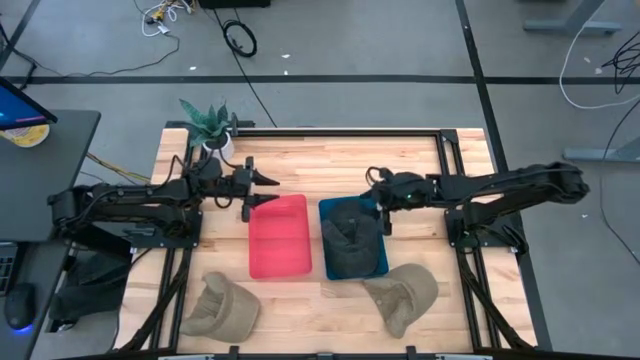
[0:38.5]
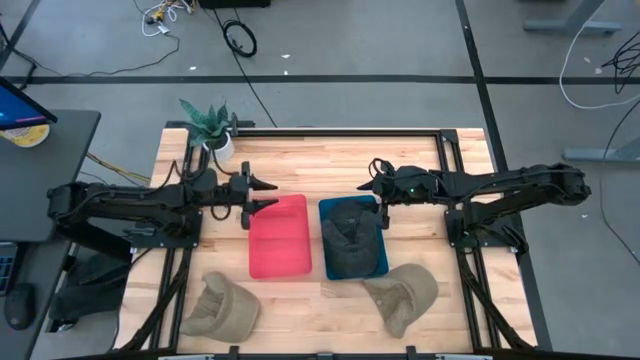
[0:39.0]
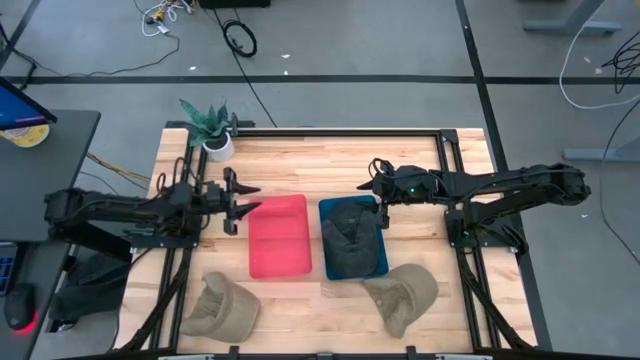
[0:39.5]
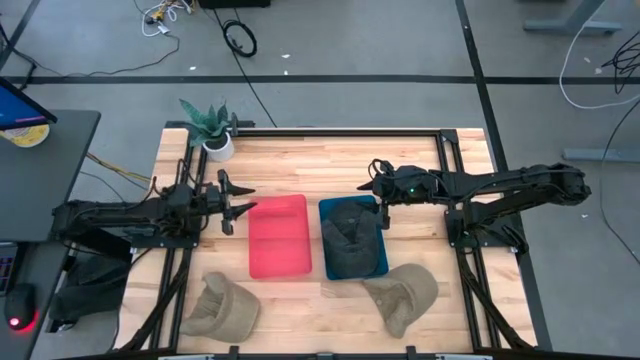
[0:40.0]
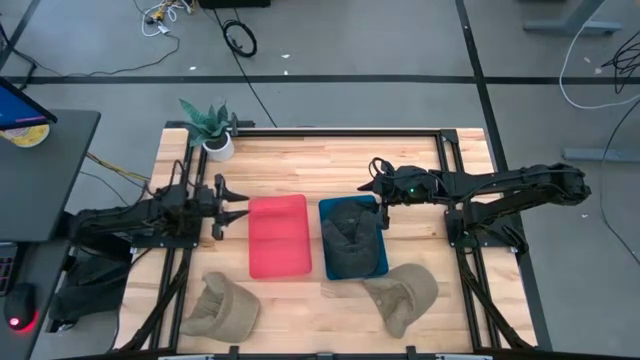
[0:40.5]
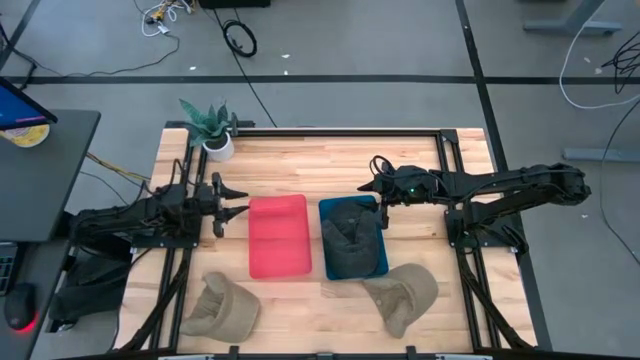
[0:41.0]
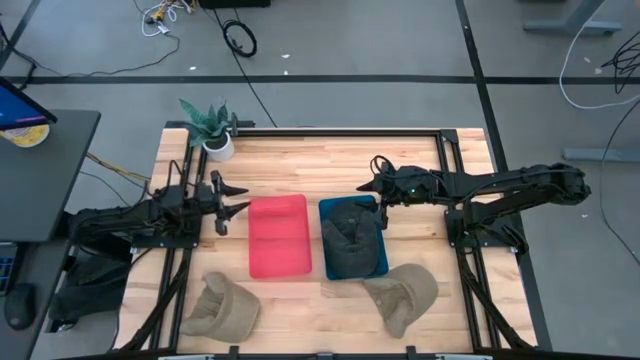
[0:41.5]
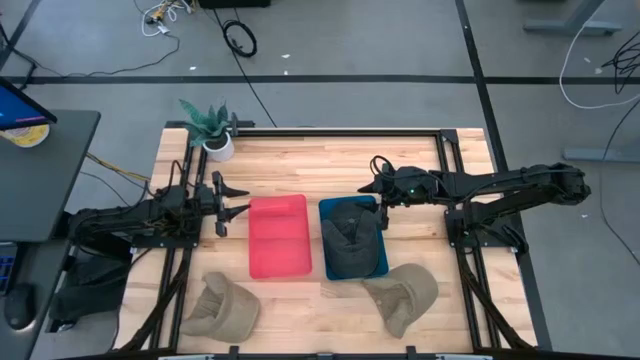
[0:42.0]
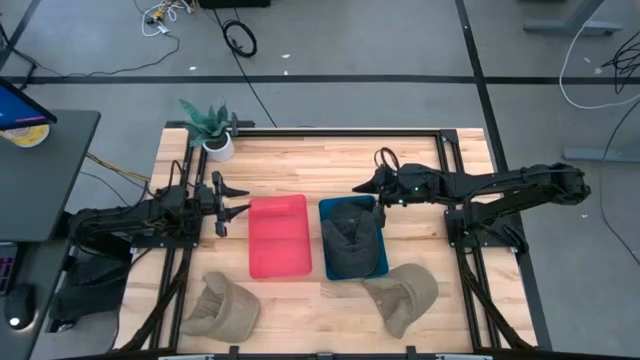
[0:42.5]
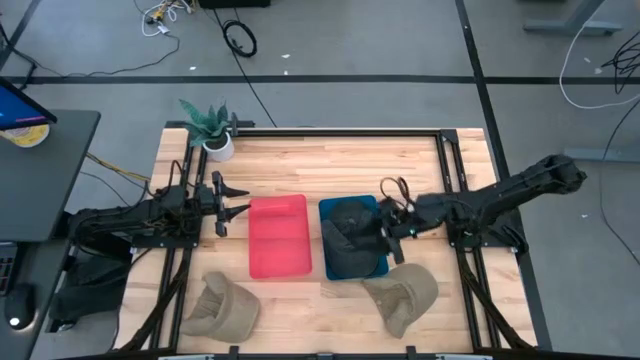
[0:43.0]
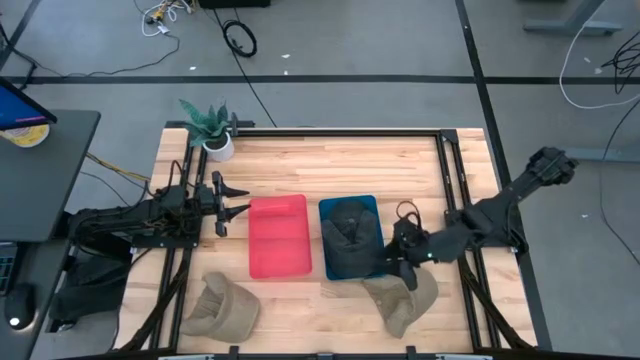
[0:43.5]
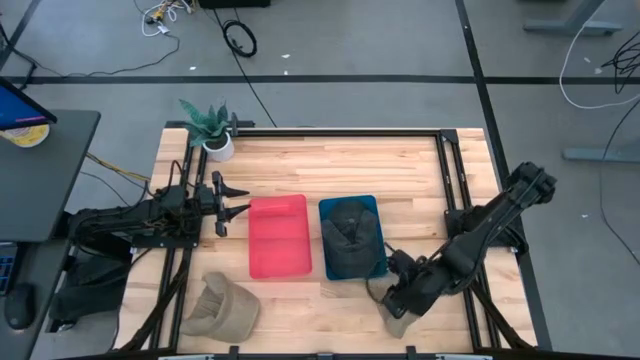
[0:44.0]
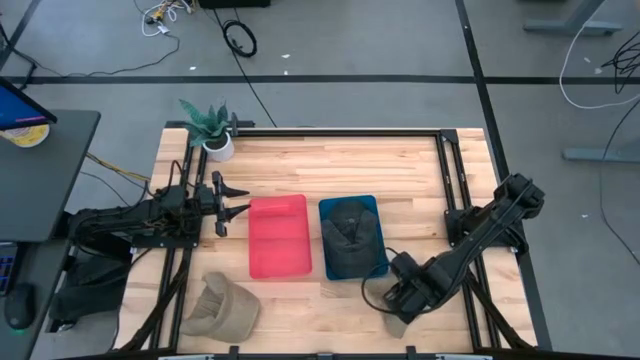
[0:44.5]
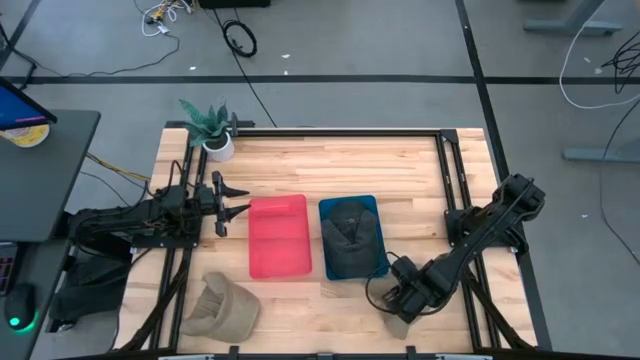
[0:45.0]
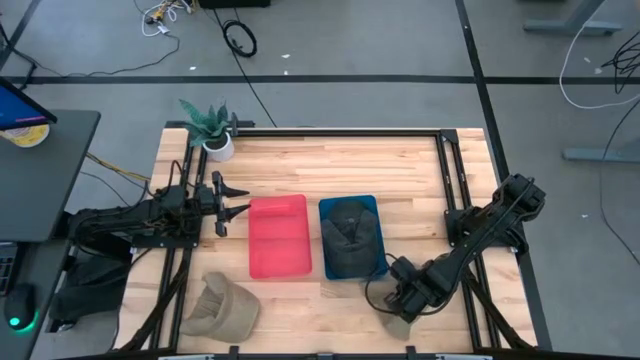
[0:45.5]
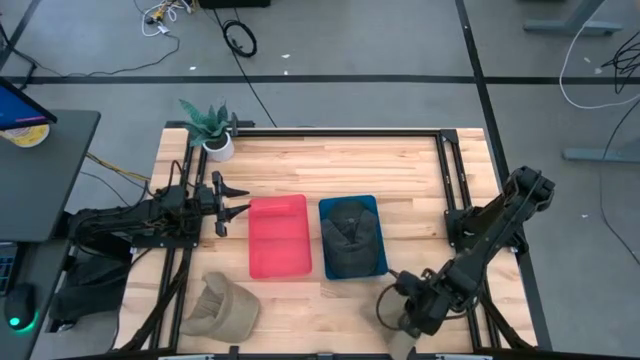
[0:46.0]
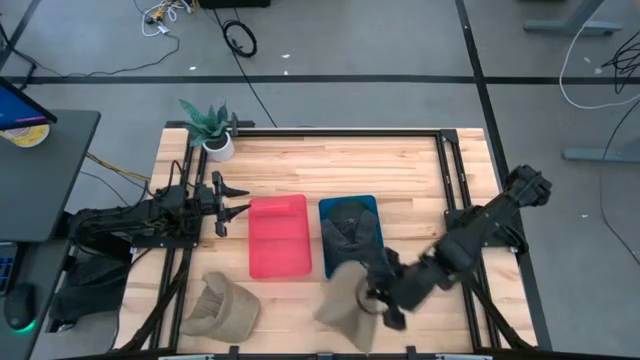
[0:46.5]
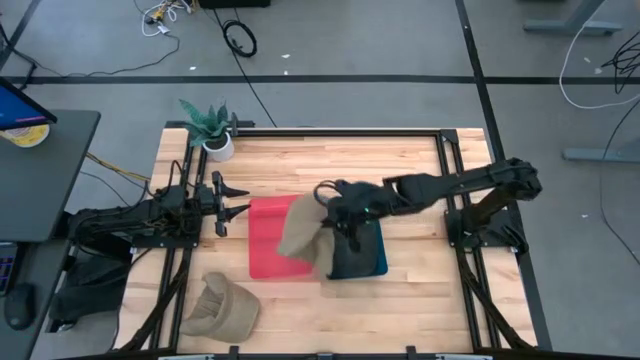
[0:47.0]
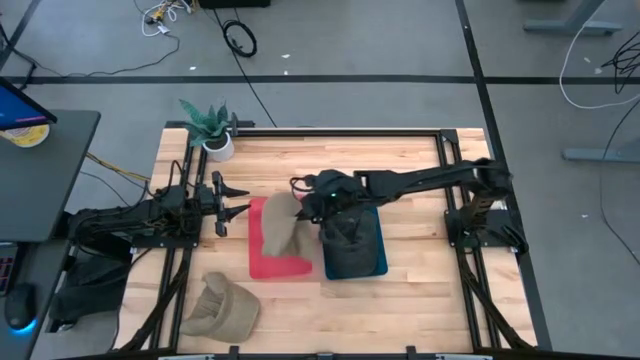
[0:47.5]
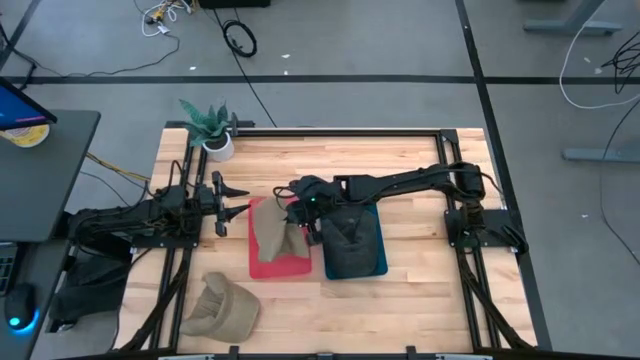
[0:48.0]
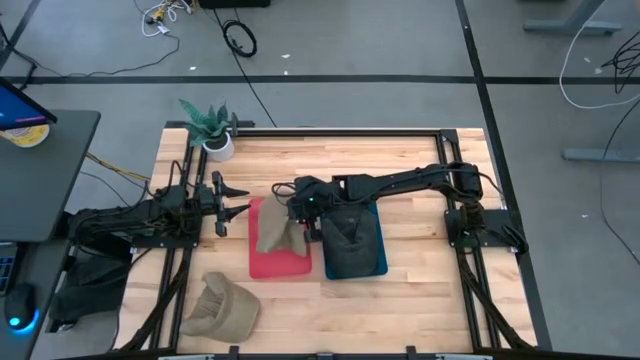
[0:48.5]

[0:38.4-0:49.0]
Task: Pick & Place hat
Put the brown cap into the red bin

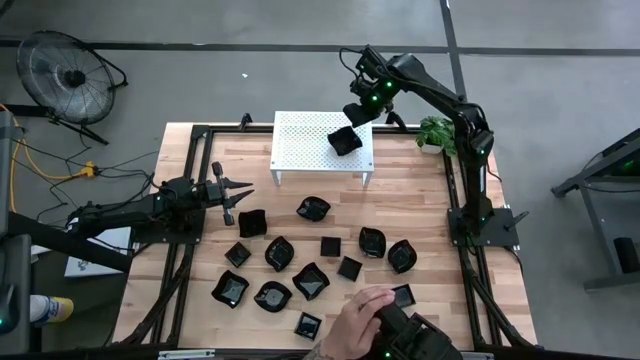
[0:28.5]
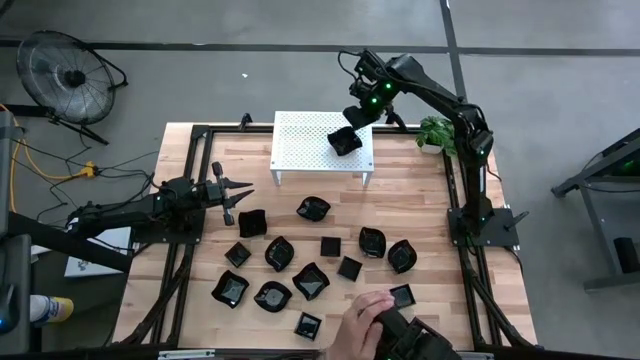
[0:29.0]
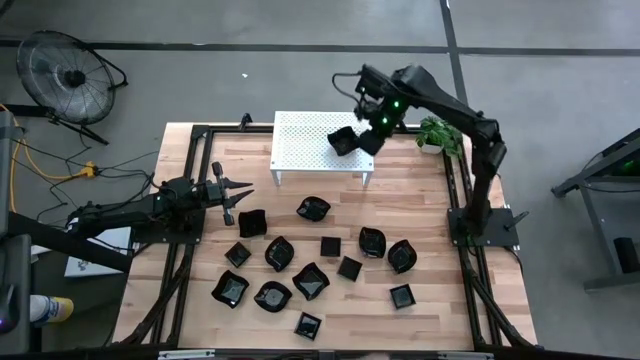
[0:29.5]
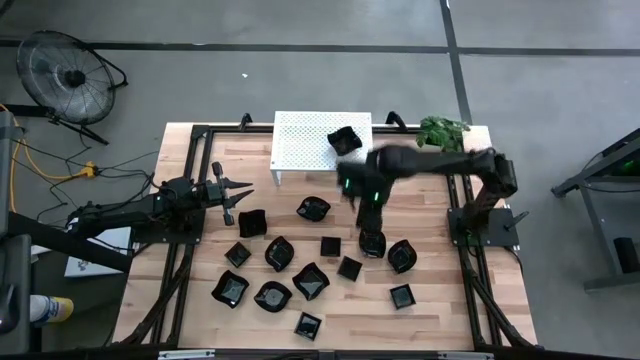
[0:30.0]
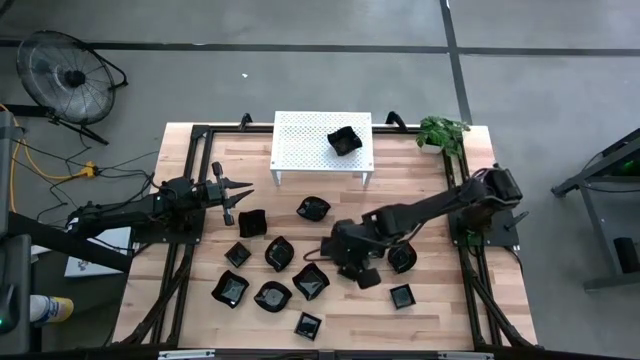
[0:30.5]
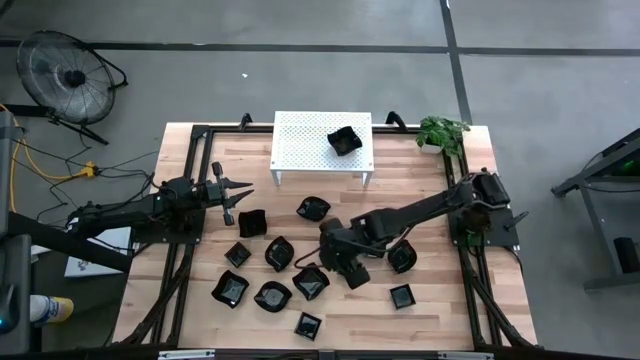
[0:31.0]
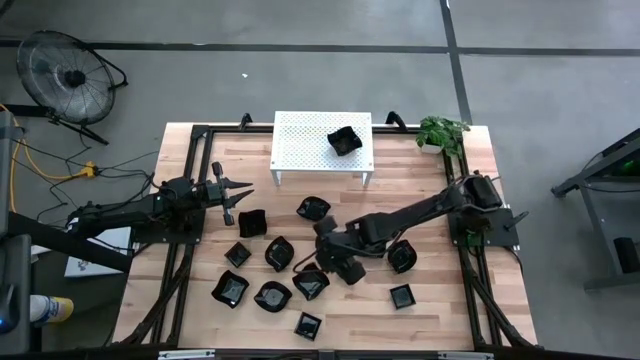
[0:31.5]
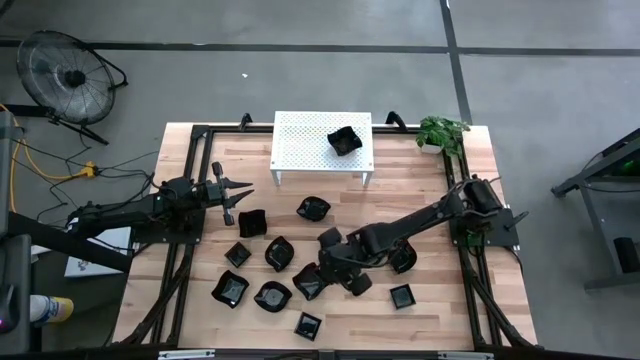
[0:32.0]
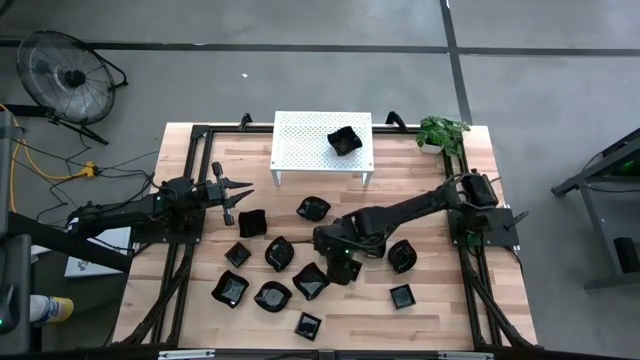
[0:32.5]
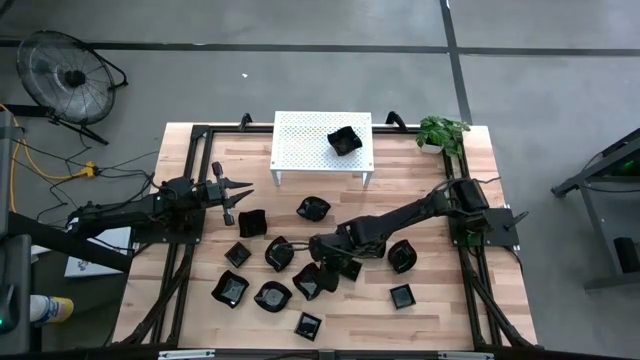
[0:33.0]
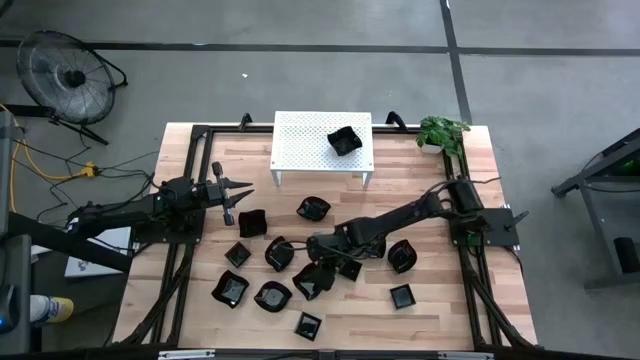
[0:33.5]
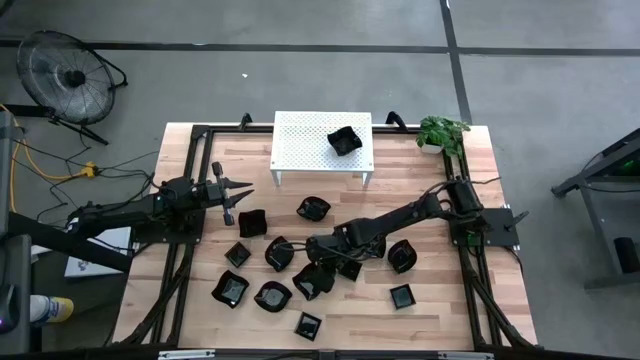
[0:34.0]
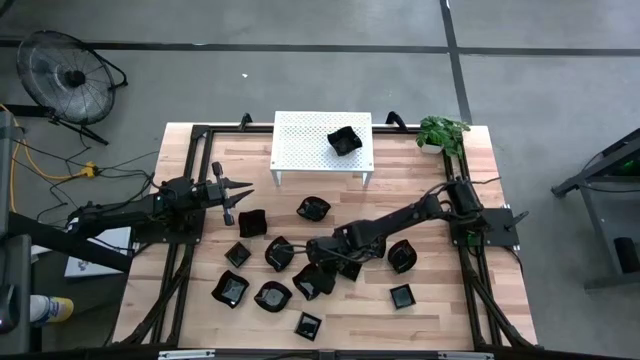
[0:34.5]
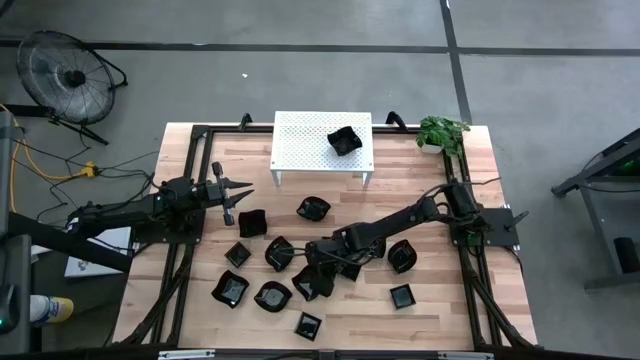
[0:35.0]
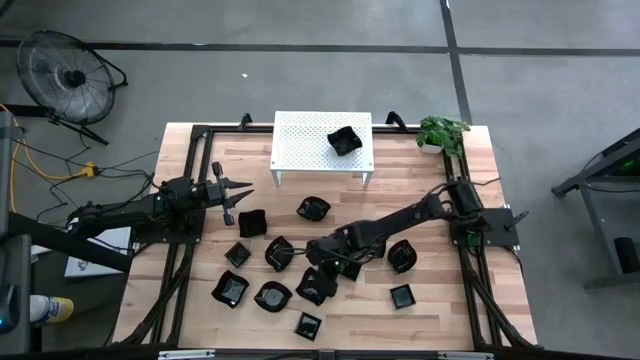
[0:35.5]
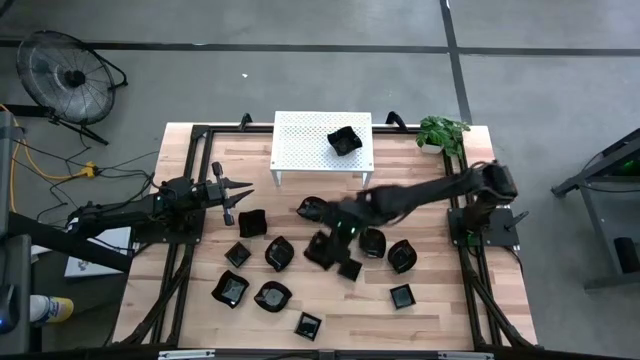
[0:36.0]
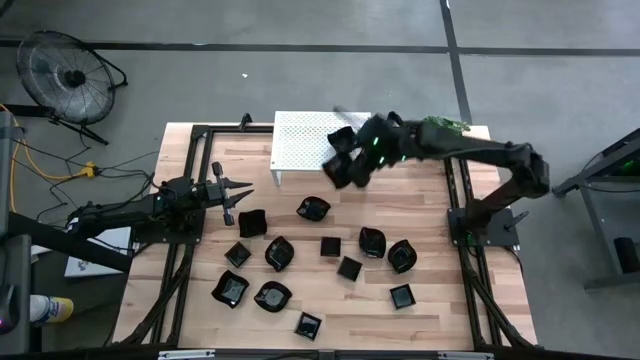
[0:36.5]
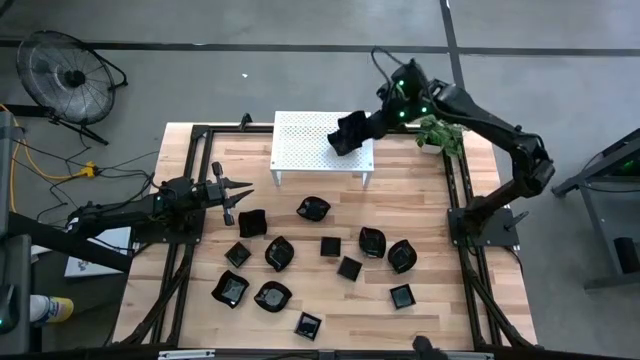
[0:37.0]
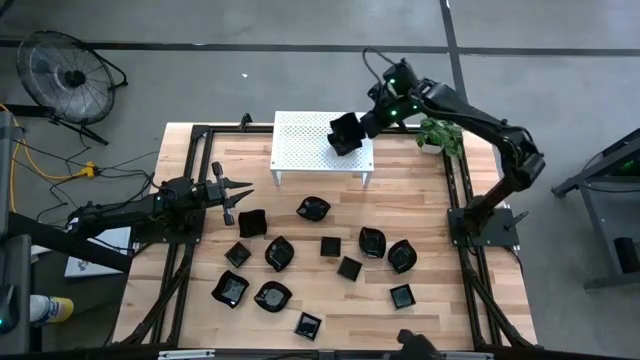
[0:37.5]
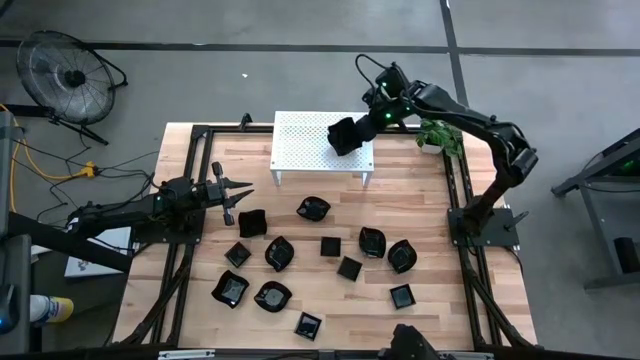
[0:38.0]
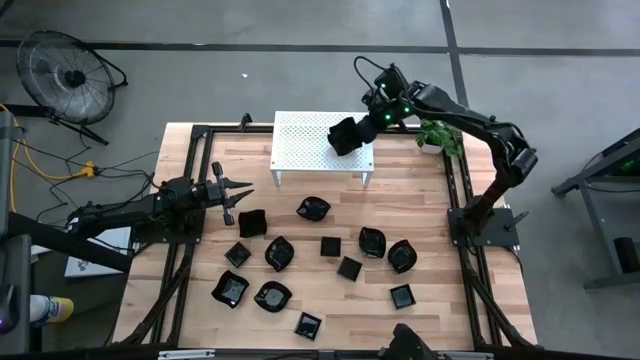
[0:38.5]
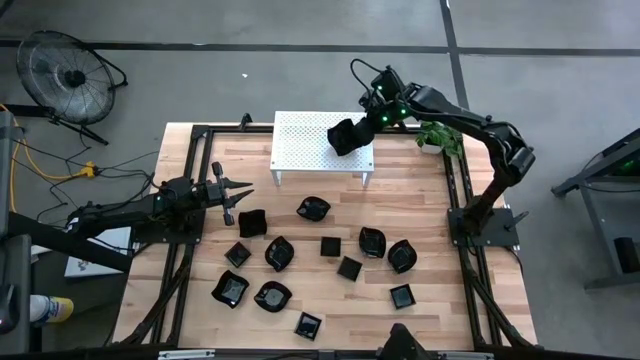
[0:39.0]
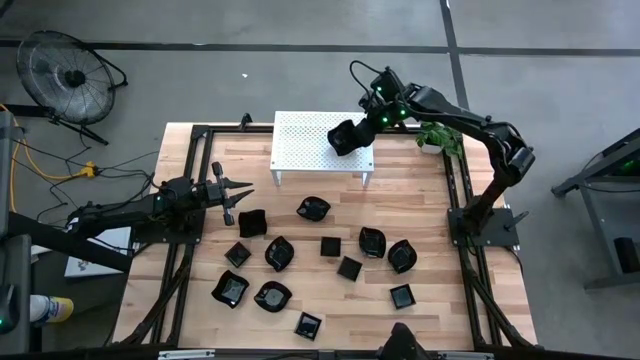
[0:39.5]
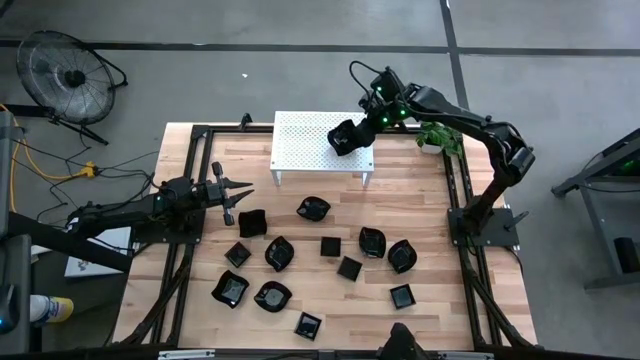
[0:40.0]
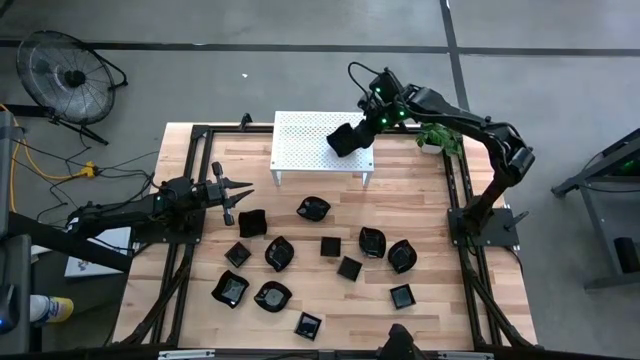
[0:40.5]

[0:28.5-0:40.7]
Task: Pick & Place Mini shaped plates
Stack the black distorted square plate on top of the black distorted square plate on the shelf
